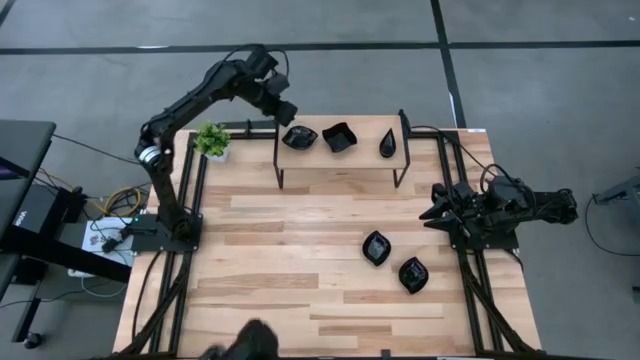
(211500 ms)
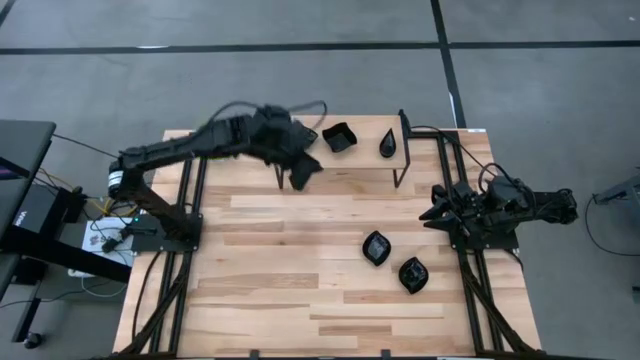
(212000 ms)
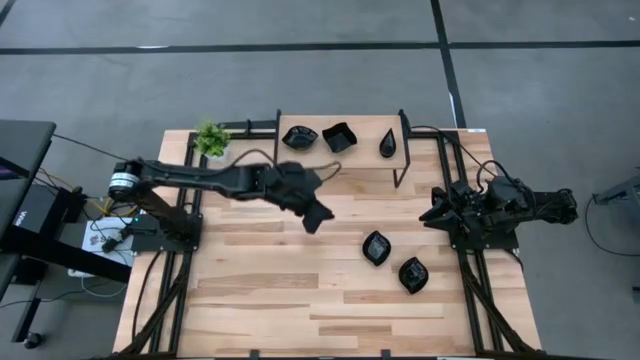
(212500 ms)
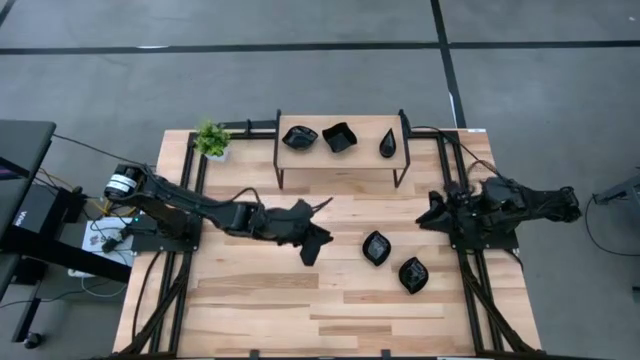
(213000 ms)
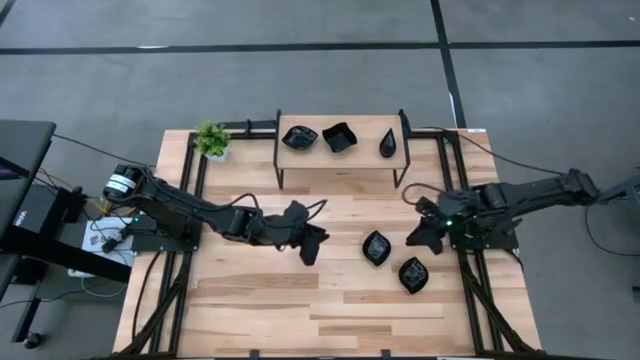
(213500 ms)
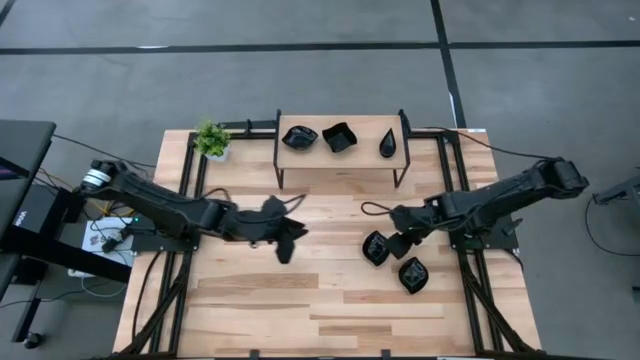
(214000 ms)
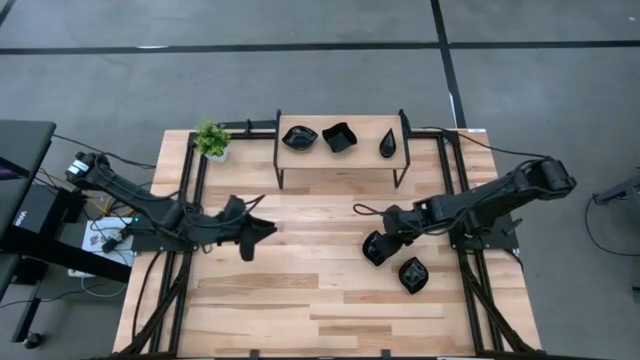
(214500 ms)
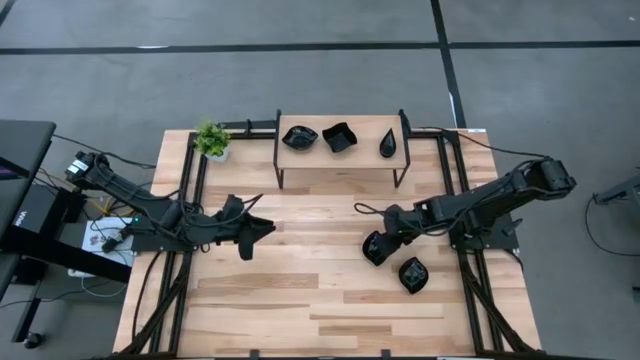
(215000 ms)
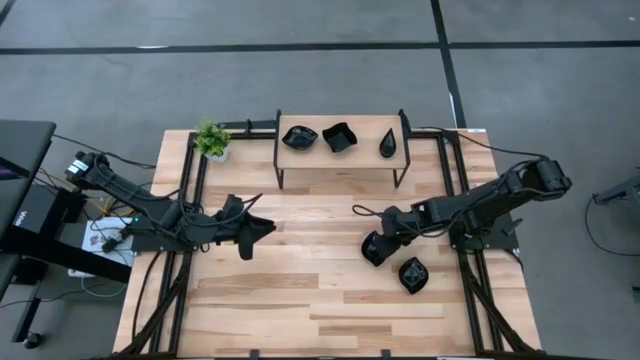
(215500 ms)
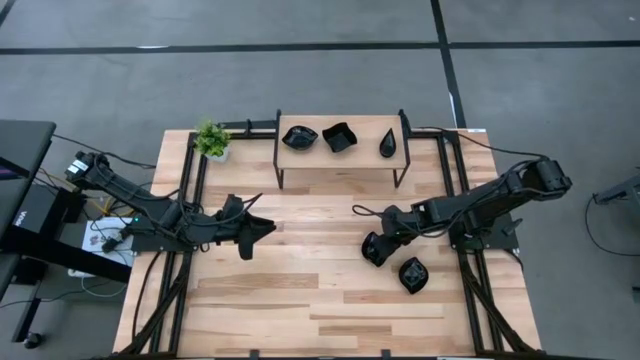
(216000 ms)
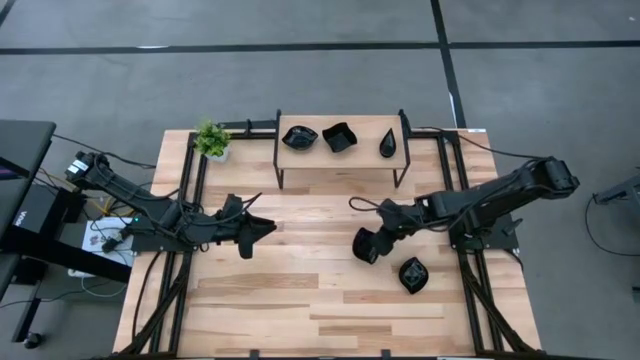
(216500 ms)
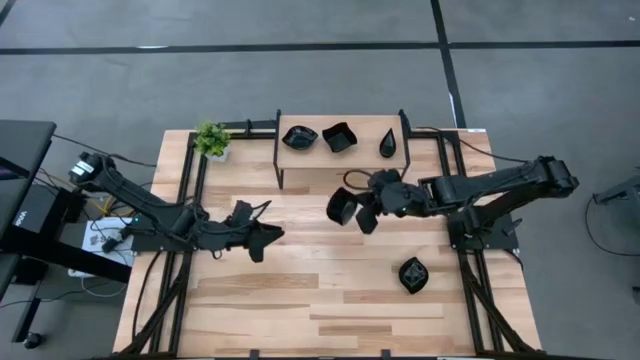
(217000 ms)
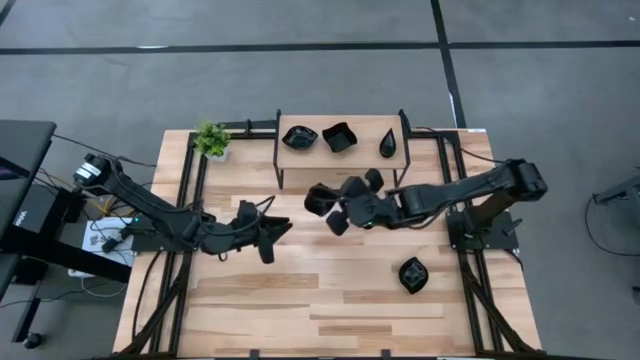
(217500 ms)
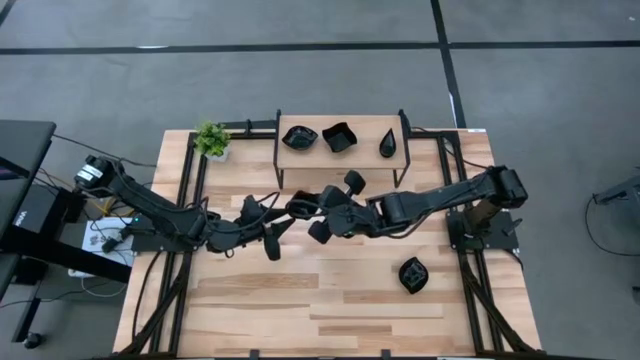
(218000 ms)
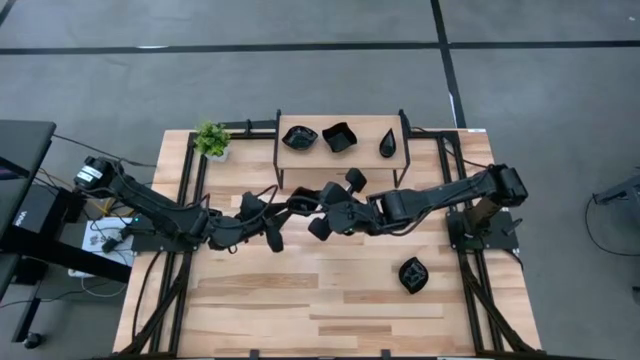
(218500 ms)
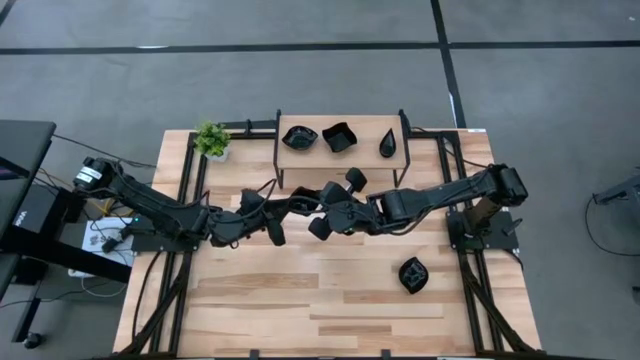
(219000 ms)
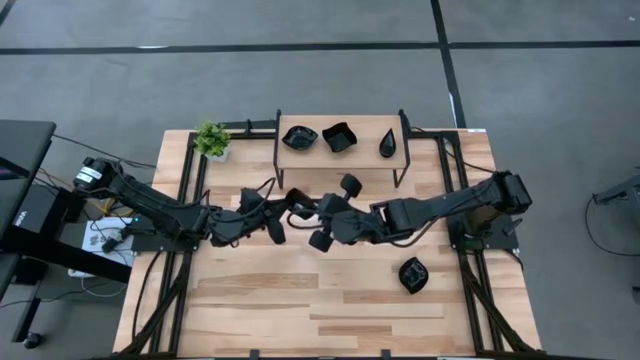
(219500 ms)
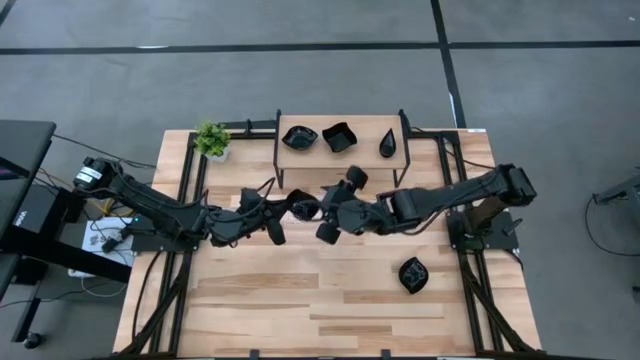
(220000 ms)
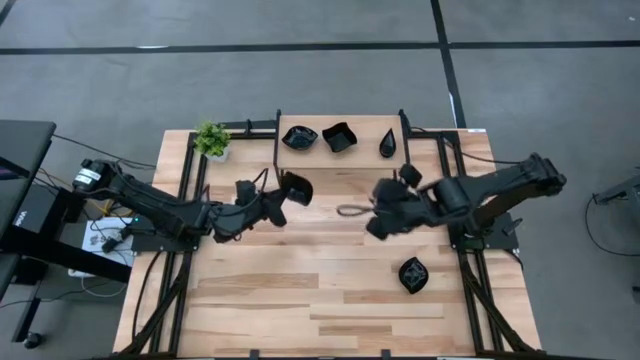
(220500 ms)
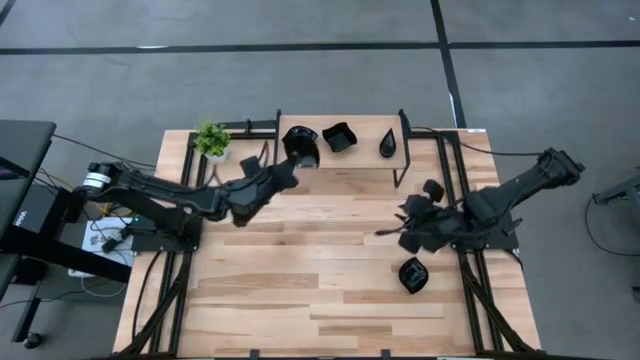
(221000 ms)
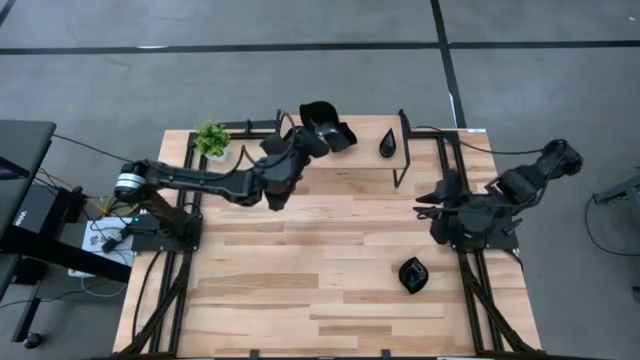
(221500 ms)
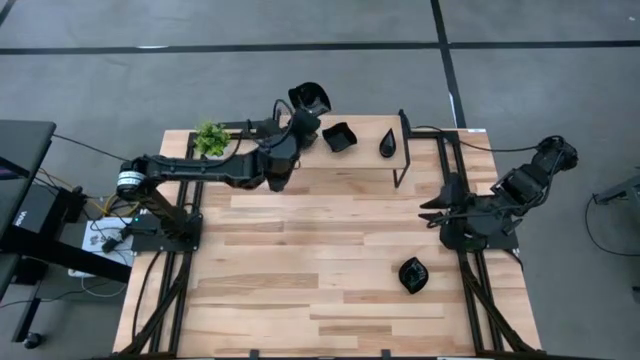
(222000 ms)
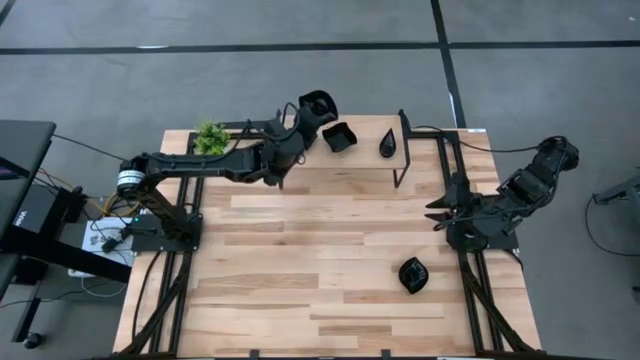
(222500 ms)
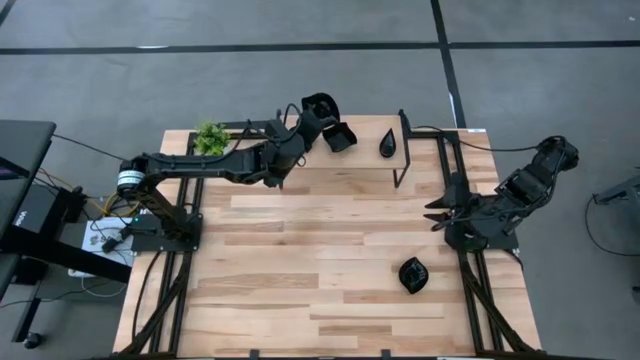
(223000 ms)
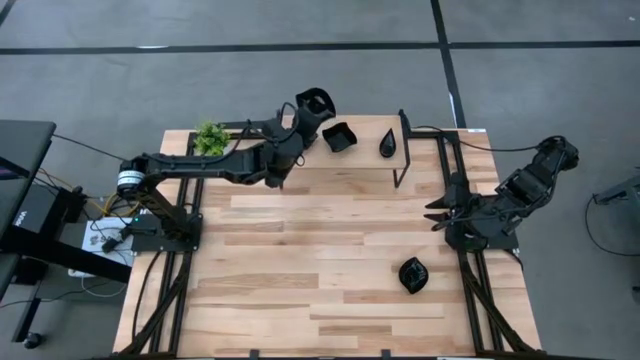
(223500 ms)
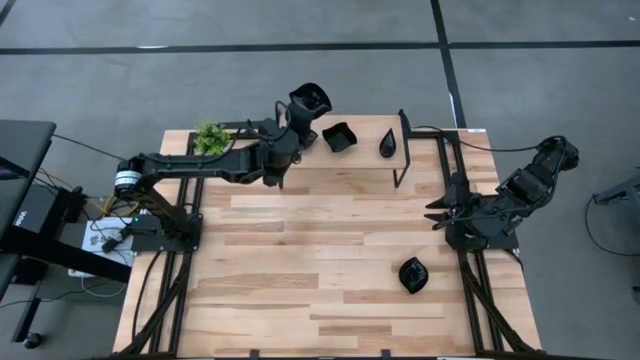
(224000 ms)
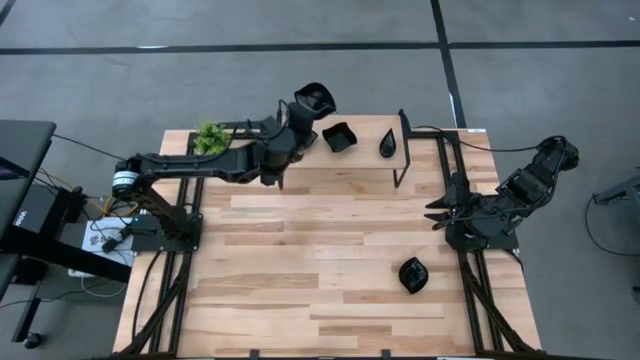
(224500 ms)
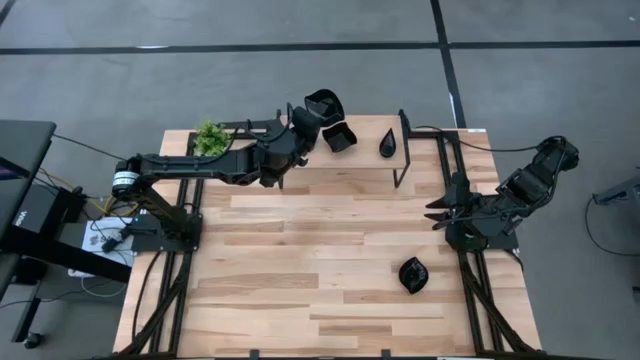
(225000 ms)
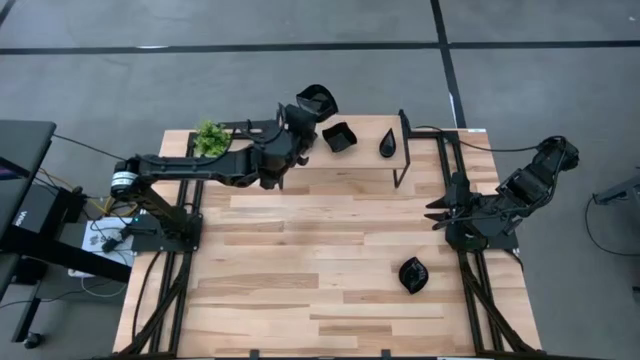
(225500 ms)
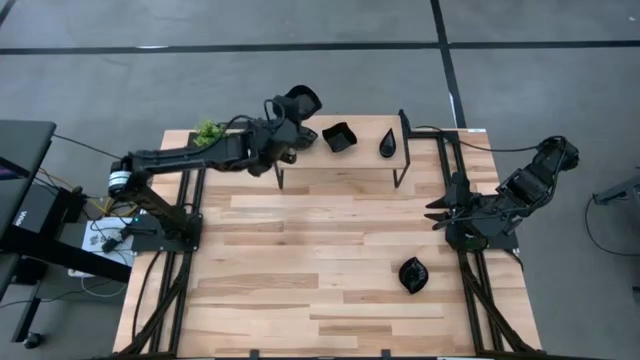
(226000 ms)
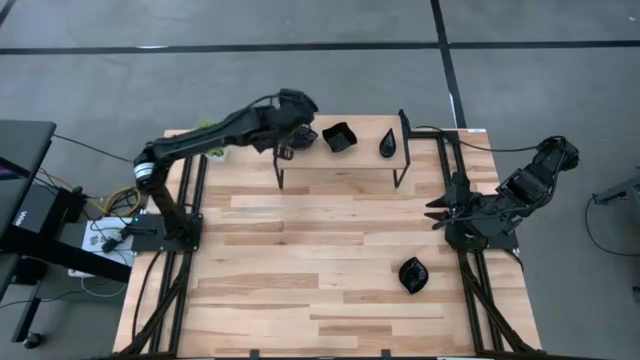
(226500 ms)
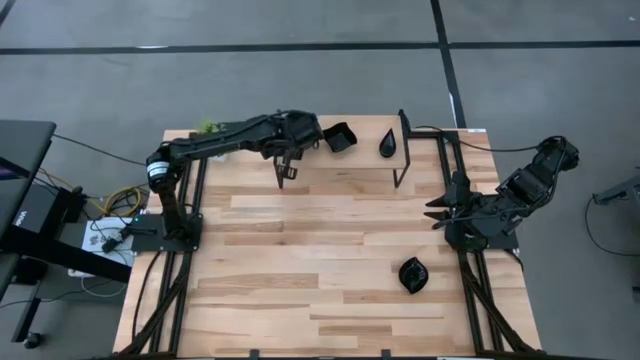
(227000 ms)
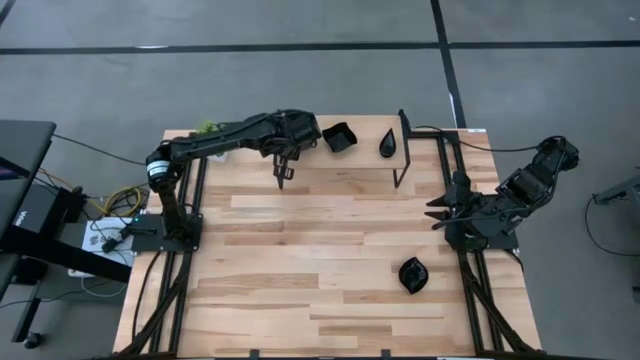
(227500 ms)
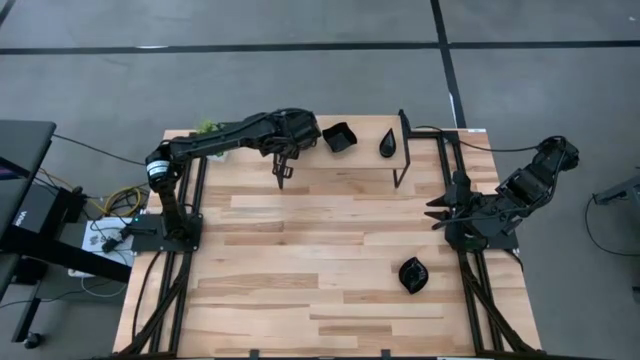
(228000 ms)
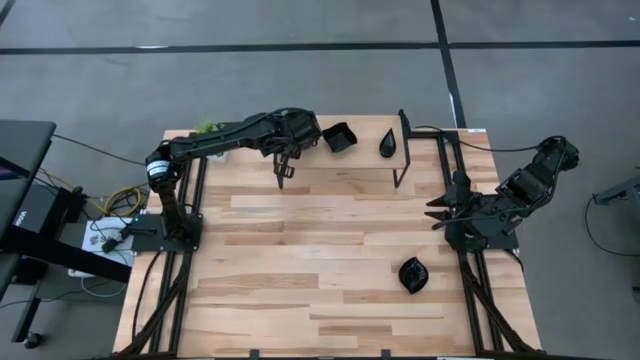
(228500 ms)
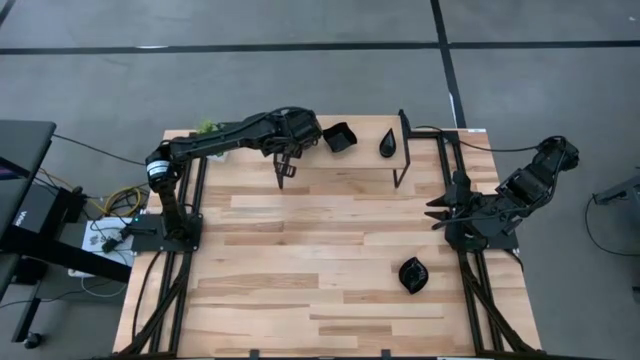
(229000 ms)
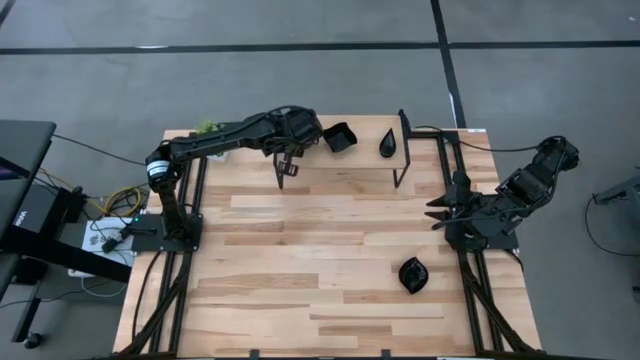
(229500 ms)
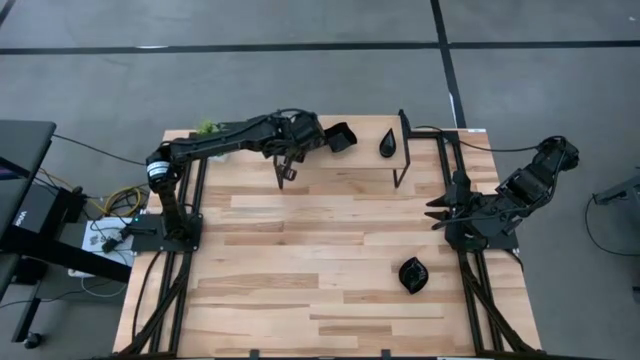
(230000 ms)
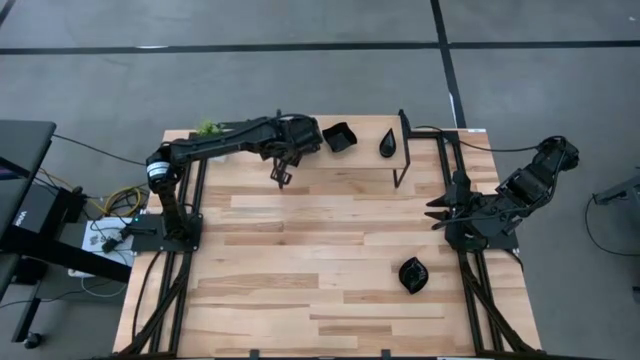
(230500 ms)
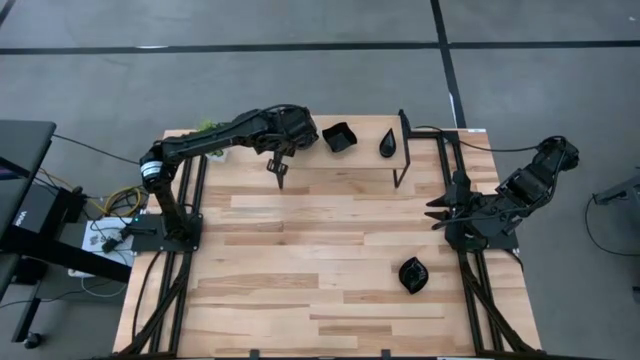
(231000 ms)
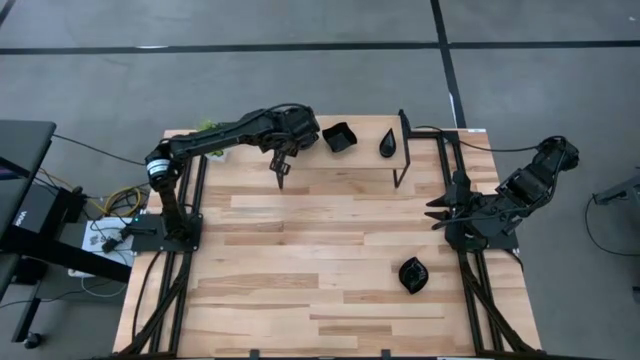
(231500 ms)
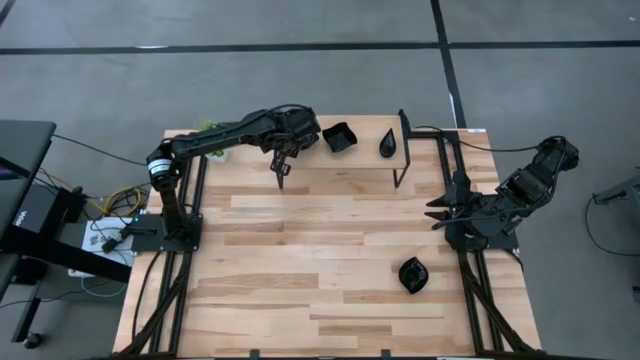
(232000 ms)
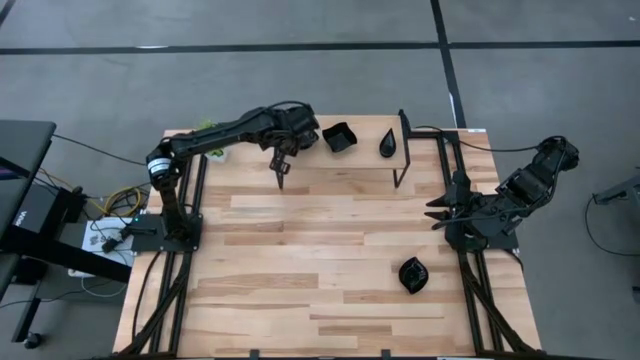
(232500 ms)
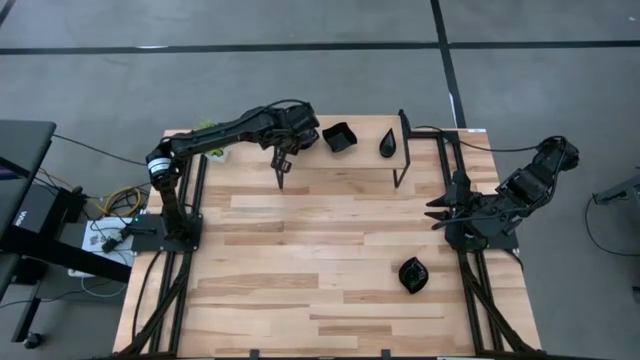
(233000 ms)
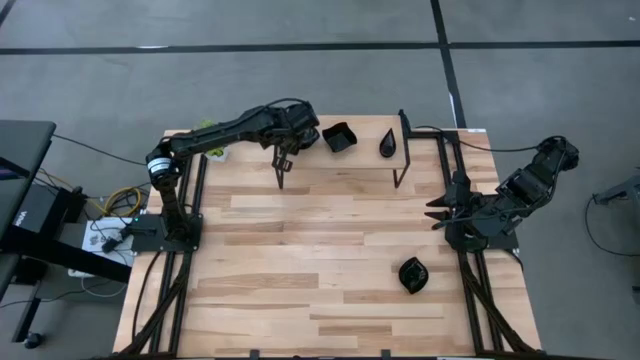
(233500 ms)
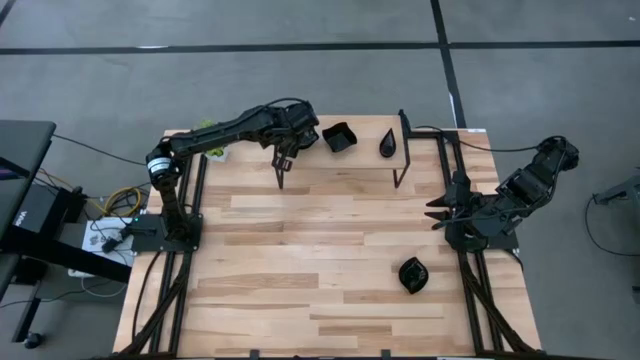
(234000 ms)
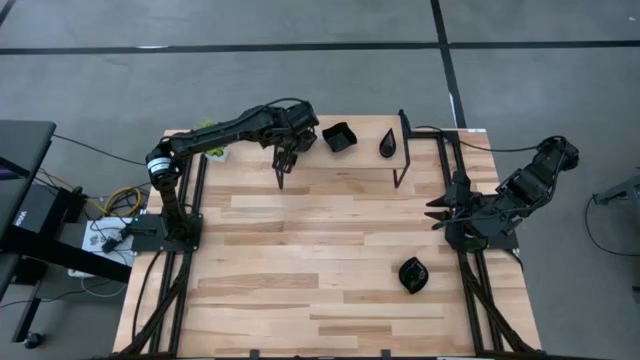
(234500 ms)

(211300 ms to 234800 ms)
Task: Pick & Place Mini shaped plates
Stack the black plate on top of the black plate on the shelf
